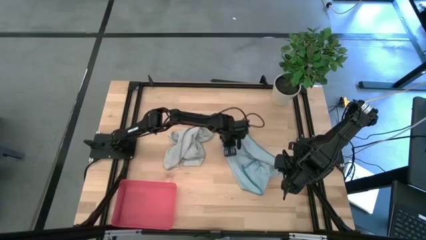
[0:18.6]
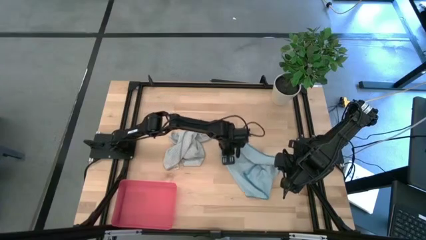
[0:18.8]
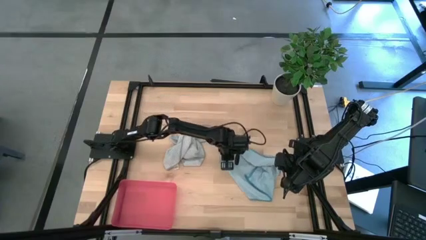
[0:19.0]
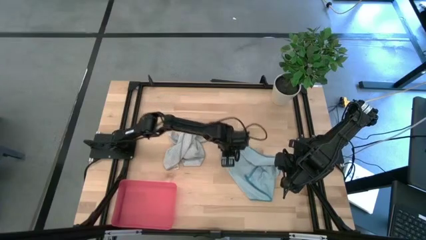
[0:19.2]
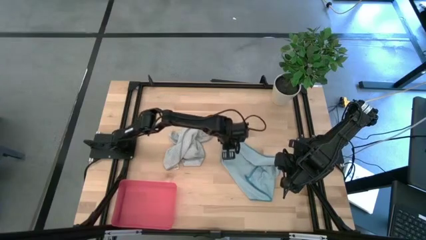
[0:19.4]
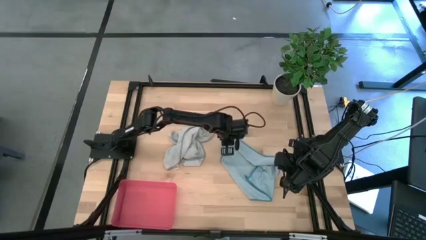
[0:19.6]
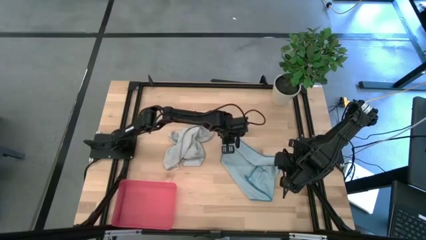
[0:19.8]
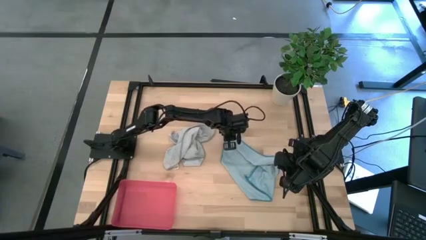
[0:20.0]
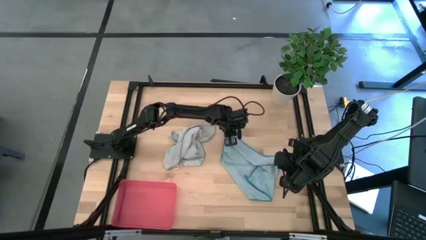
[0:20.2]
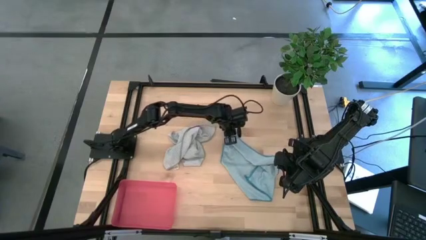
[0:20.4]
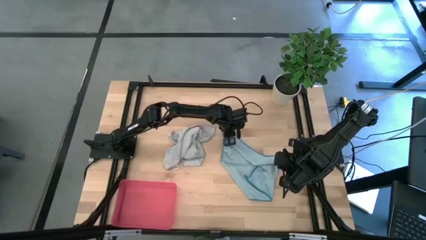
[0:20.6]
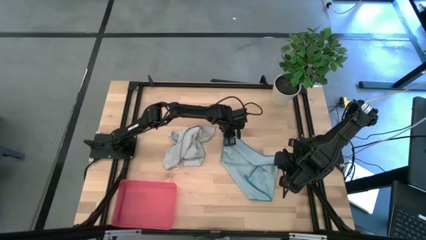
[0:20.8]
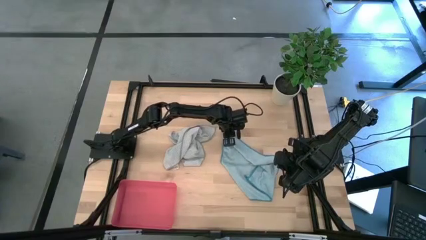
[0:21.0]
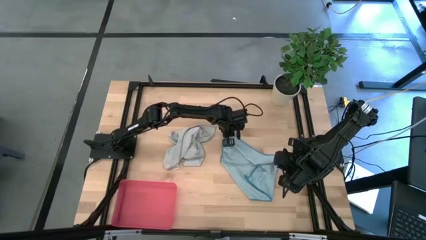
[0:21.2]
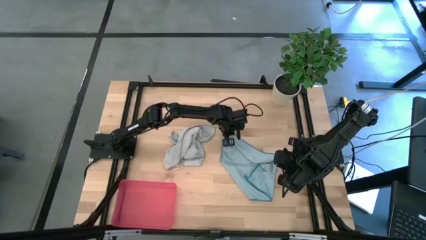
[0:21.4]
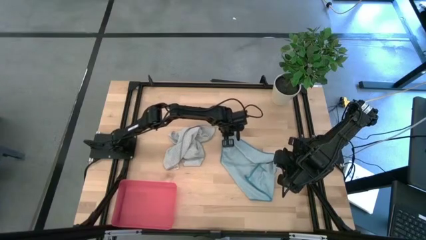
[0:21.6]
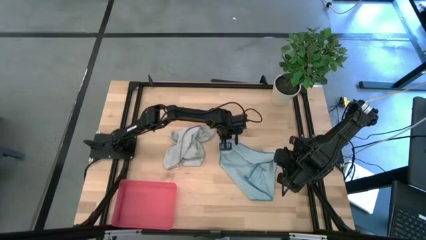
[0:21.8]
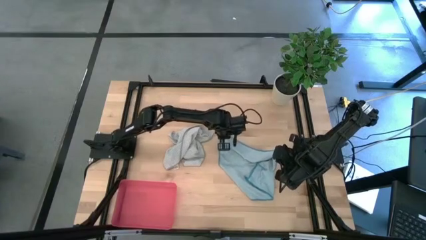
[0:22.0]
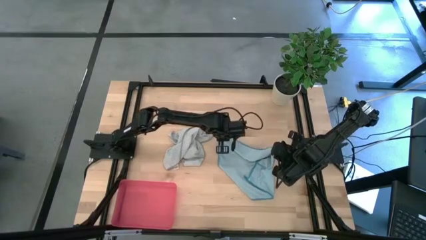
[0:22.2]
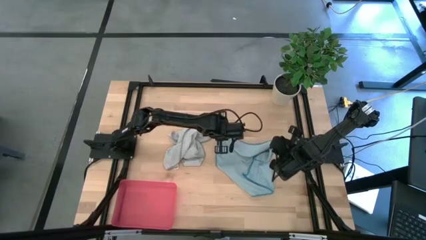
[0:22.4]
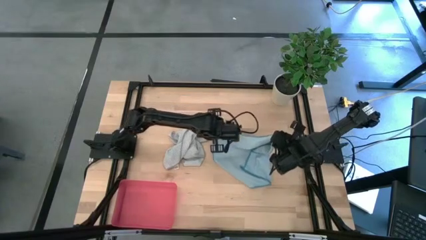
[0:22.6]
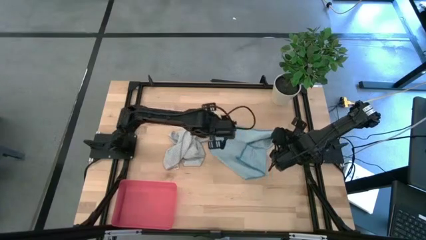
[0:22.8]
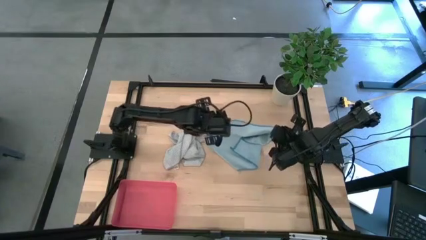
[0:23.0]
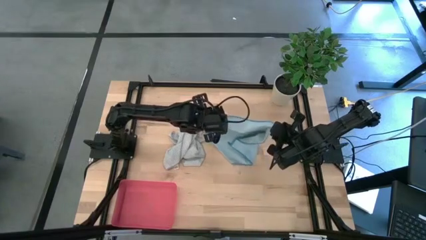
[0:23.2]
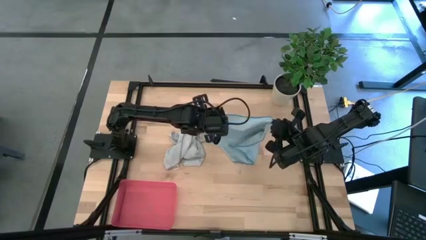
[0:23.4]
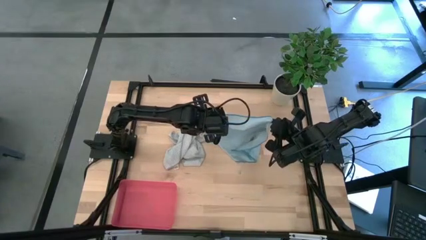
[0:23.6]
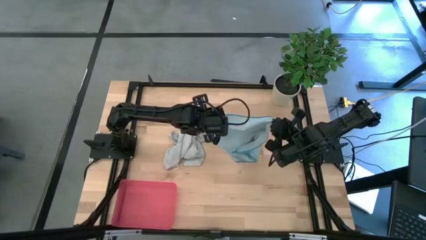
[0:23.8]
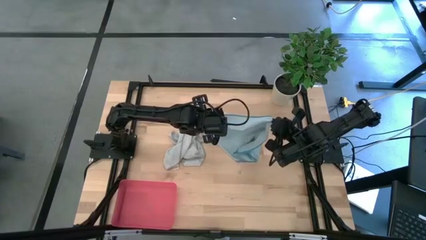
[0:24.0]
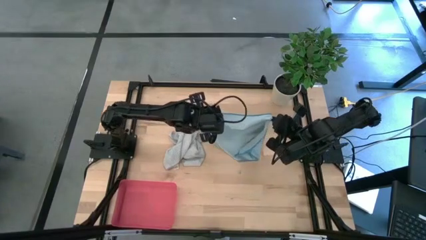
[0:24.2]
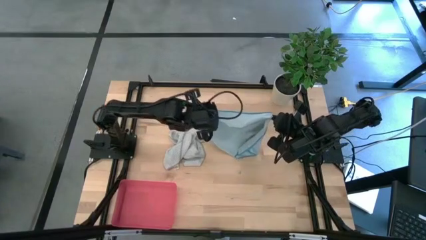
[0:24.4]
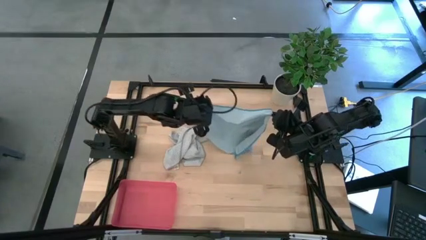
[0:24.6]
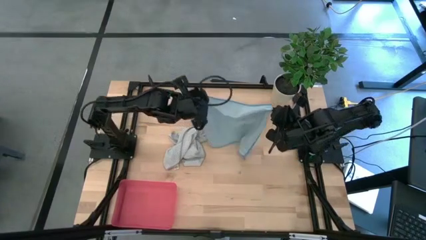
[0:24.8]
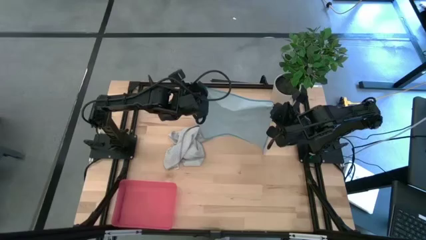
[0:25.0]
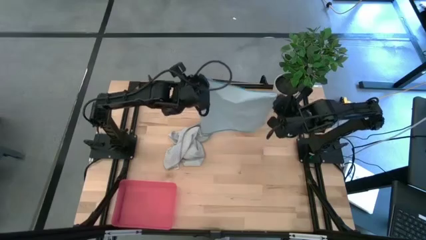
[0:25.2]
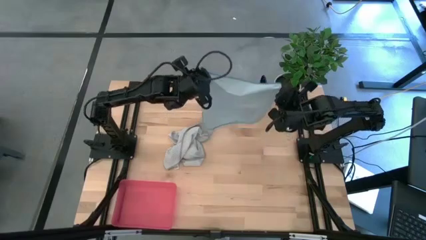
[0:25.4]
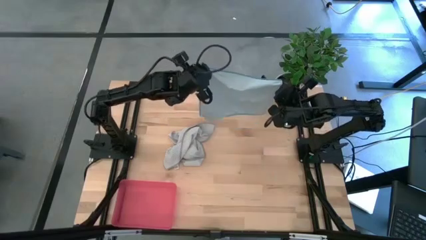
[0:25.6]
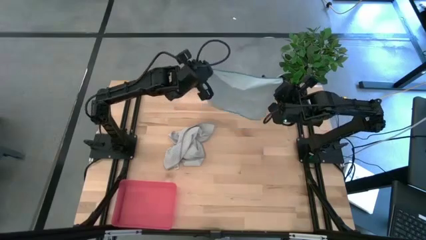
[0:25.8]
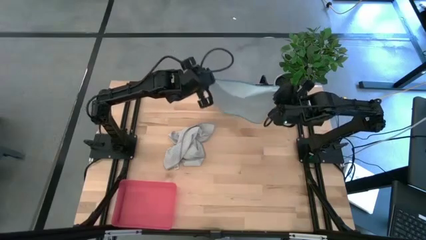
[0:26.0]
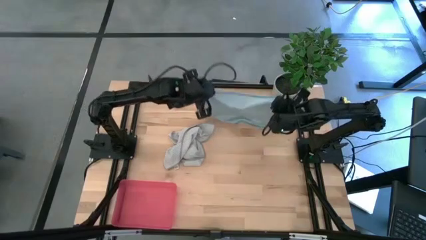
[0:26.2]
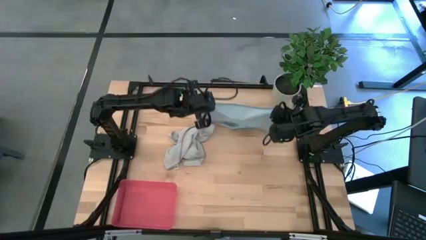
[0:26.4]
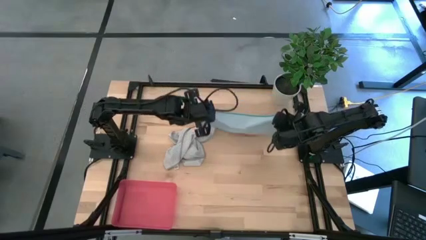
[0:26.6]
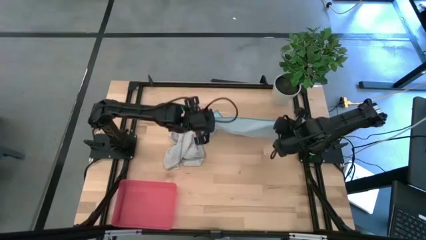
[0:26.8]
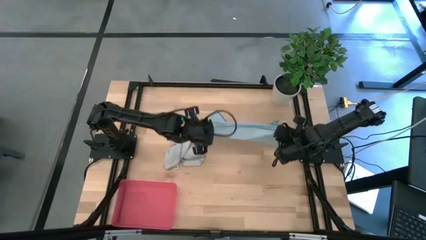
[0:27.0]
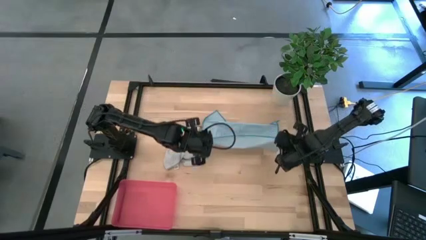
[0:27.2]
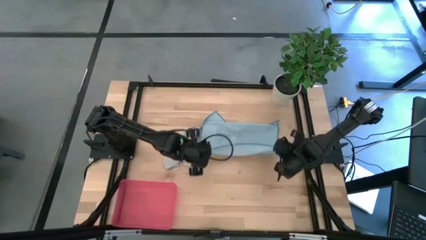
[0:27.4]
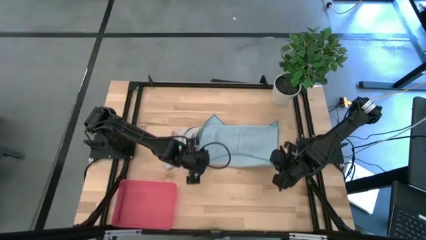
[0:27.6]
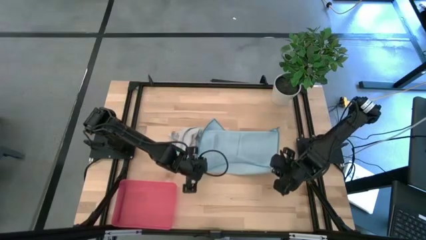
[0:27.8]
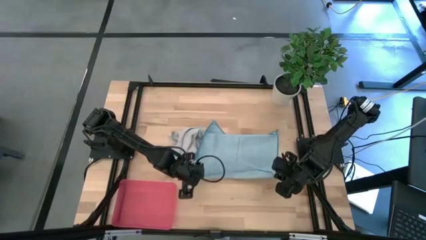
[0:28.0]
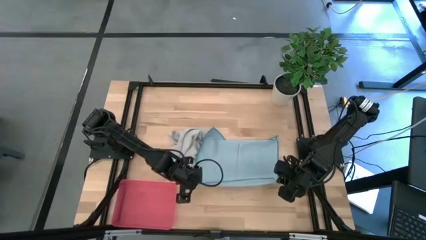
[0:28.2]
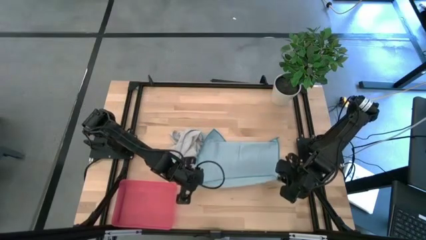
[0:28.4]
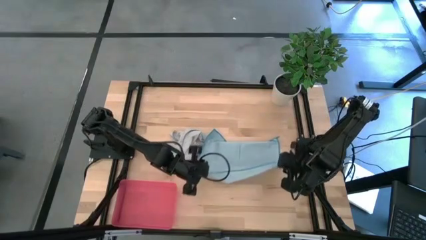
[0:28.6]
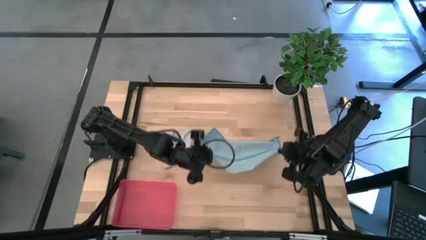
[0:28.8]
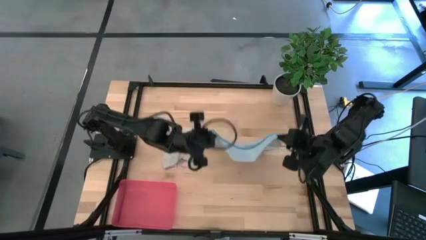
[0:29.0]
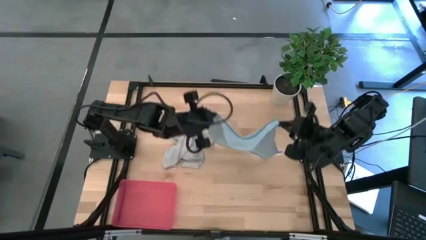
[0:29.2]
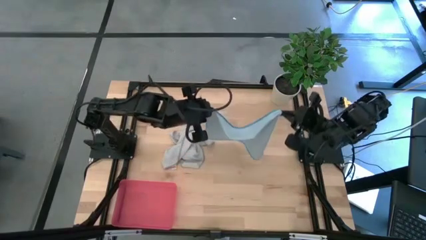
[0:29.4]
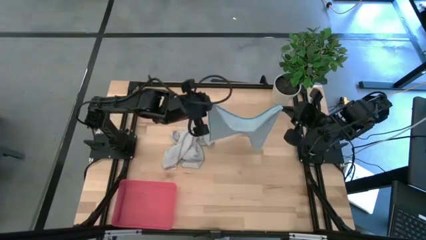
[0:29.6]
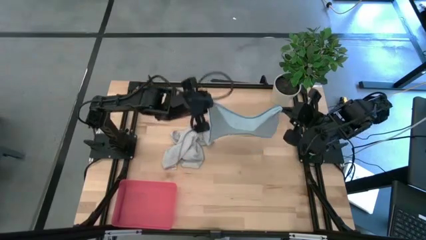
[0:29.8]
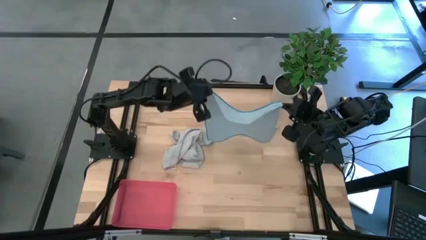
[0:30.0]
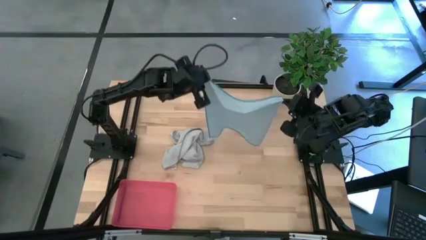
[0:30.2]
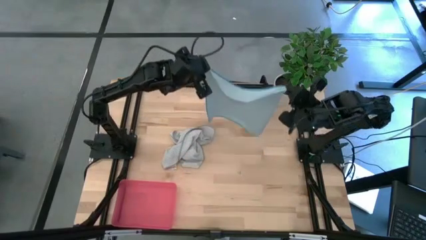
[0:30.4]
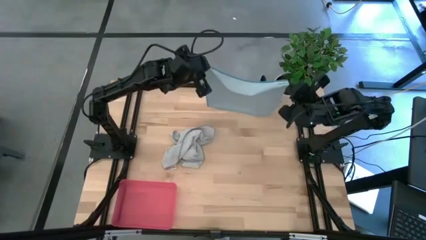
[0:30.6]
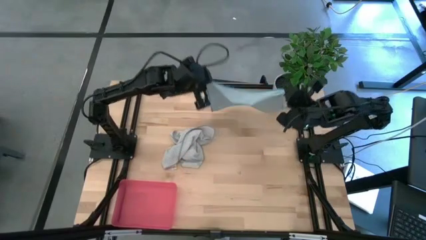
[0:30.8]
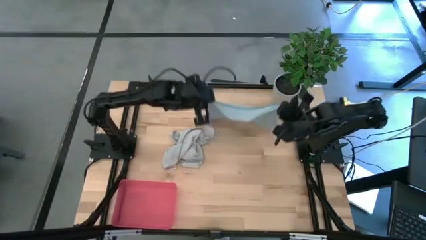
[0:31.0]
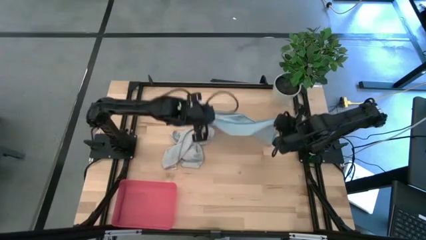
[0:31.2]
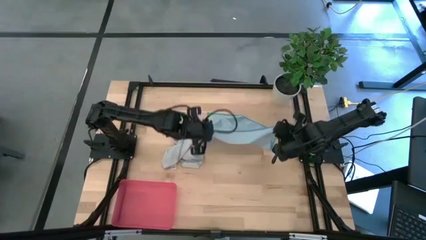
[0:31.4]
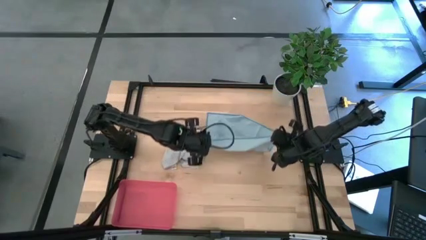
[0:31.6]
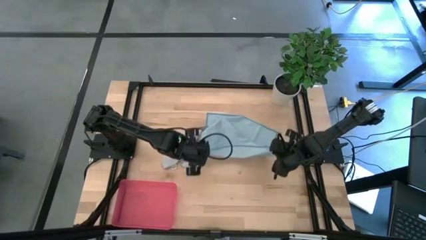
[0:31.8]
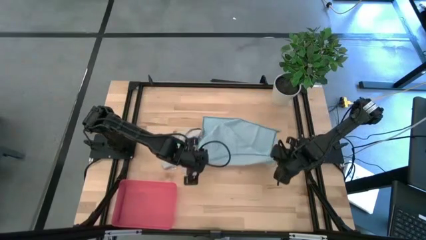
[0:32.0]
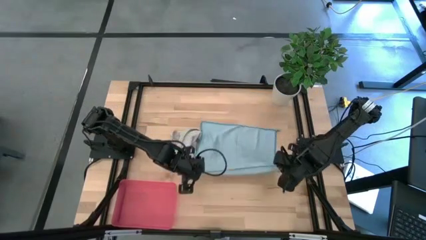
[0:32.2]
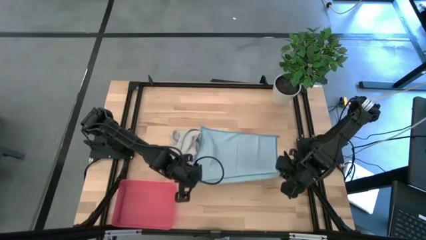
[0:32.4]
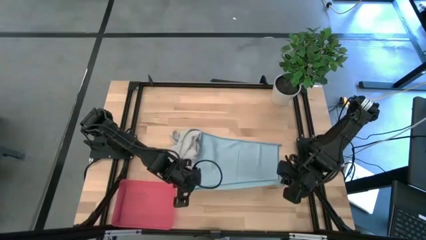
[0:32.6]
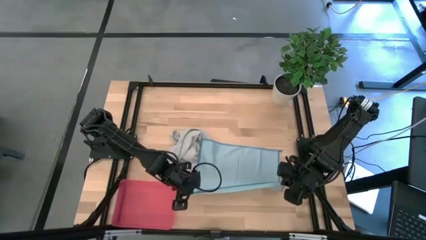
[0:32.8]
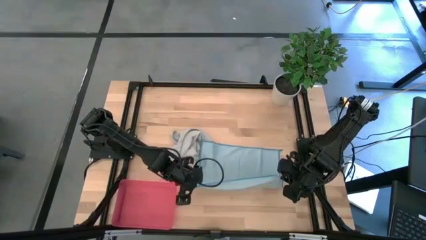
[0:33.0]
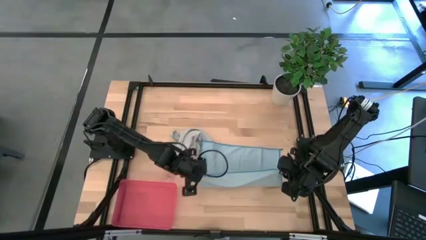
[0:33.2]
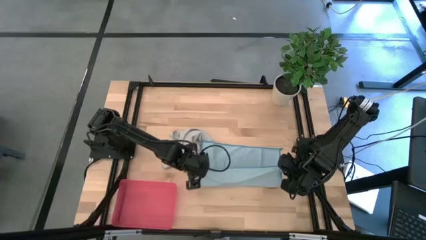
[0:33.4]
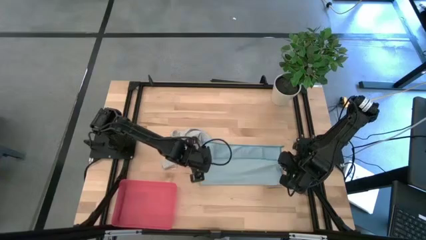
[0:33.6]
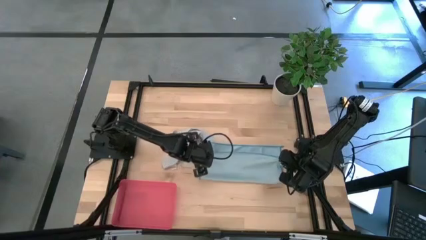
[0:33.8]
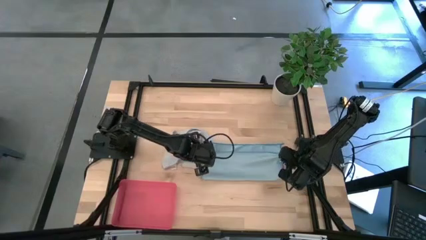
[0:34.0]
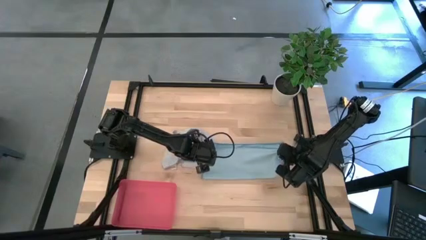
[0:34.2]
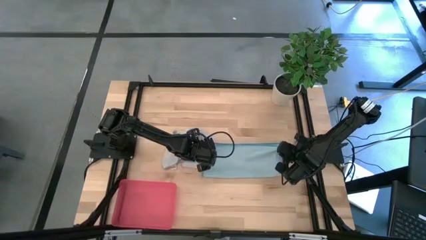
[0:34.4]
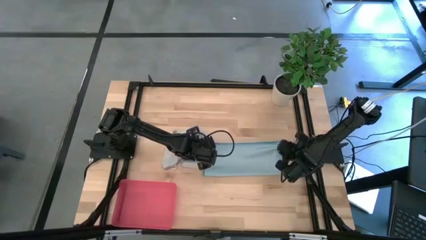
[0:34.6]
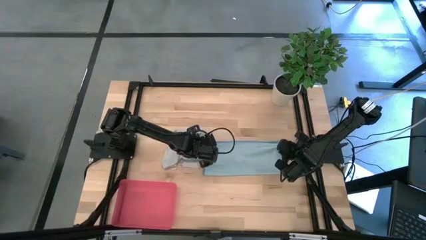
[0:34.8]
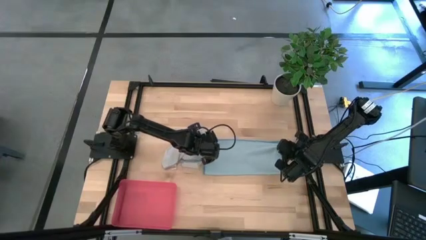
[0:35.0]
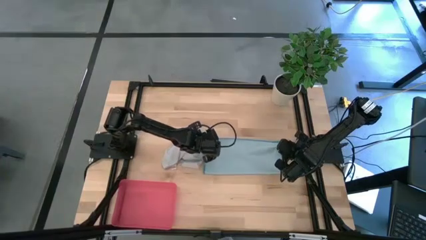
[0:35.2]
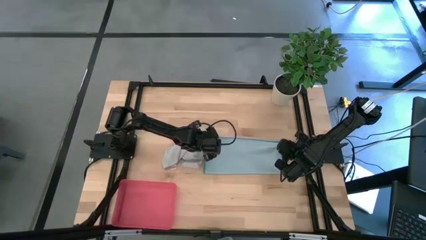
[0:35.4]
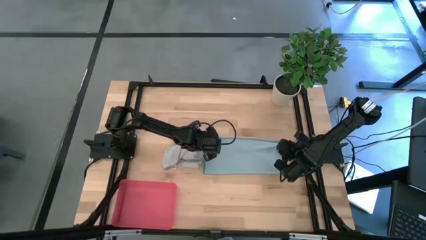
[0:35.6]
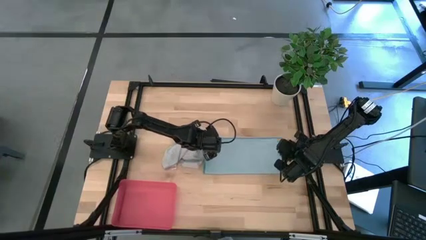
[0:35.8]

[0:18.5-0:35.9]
Task: Roll microfiber towels into tight, uniform cylinder then place into a basket
Fold the blue towel
